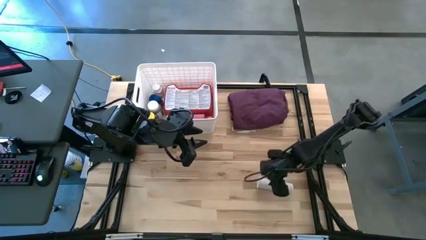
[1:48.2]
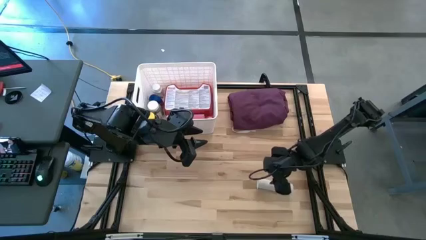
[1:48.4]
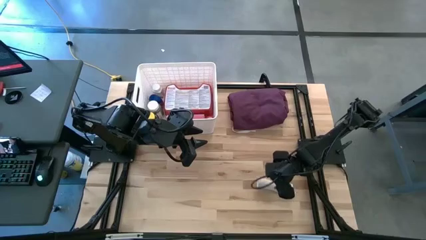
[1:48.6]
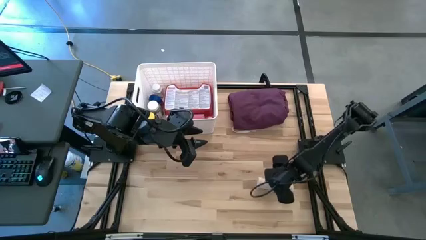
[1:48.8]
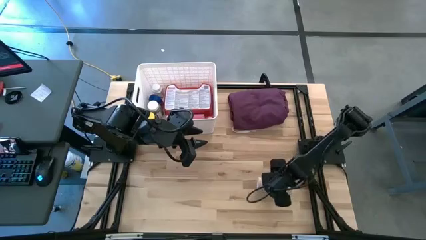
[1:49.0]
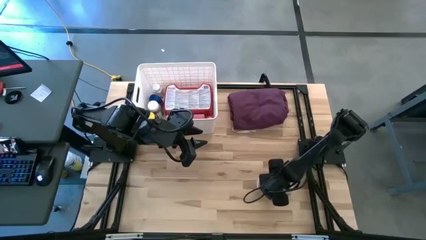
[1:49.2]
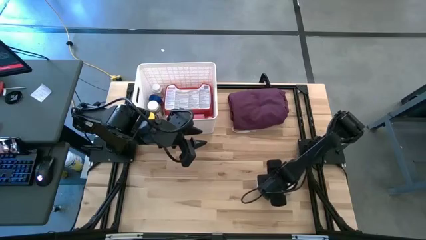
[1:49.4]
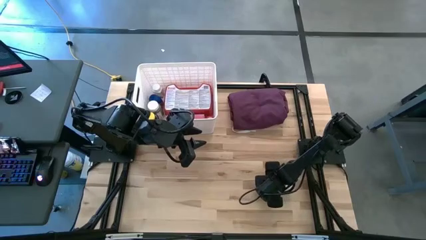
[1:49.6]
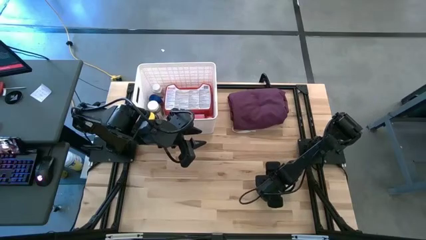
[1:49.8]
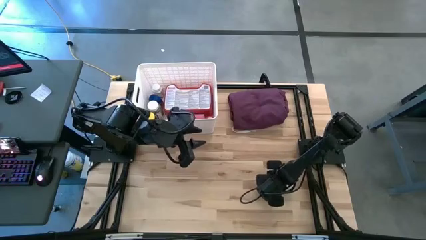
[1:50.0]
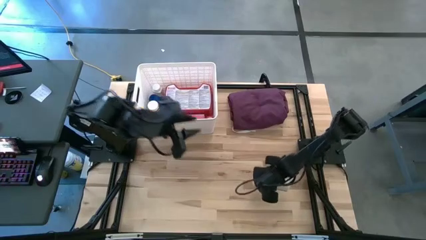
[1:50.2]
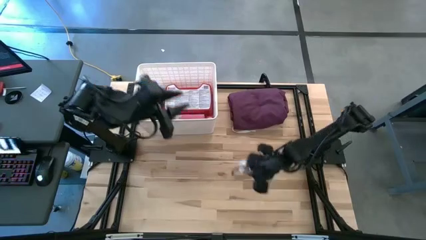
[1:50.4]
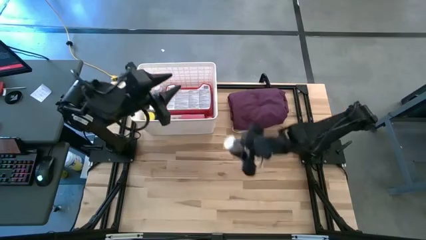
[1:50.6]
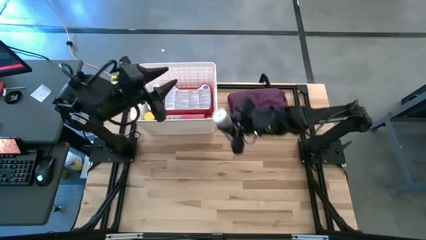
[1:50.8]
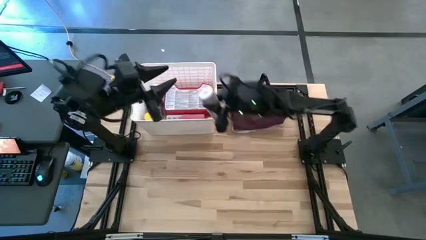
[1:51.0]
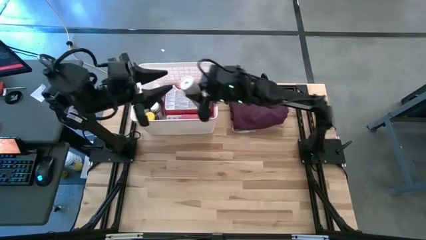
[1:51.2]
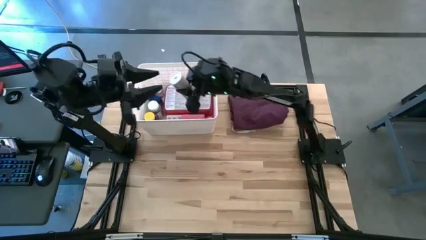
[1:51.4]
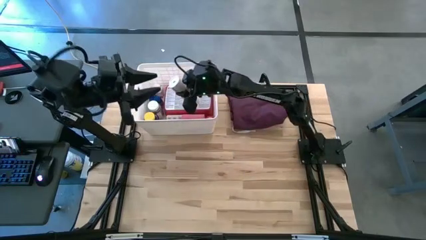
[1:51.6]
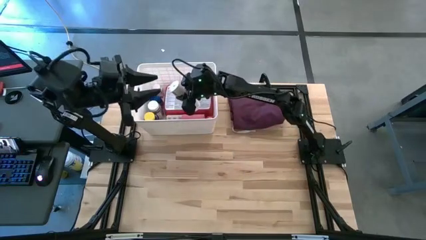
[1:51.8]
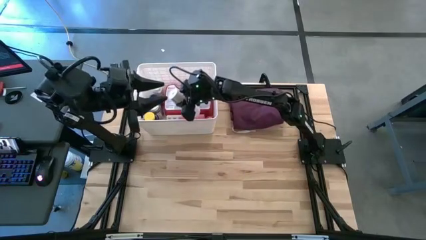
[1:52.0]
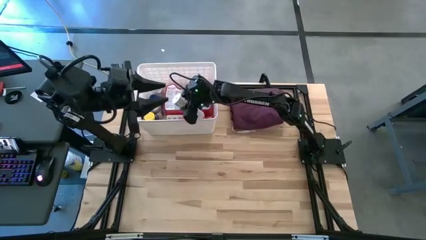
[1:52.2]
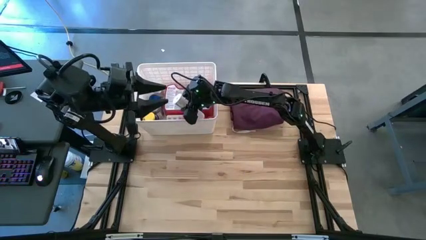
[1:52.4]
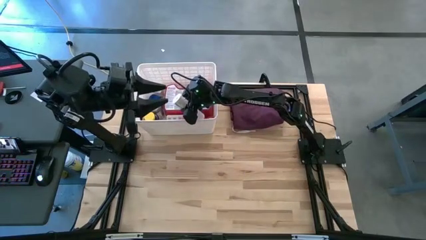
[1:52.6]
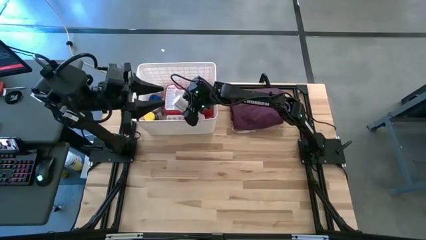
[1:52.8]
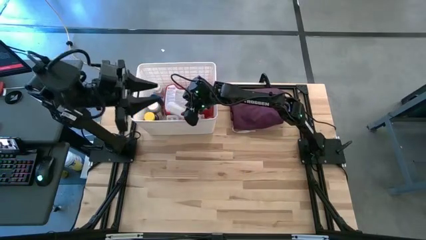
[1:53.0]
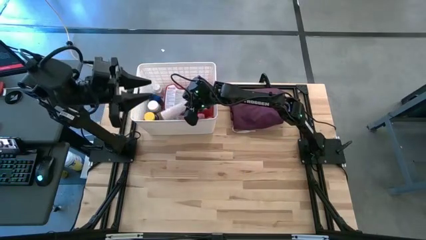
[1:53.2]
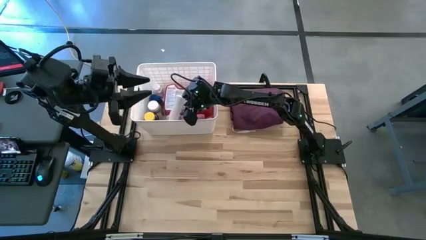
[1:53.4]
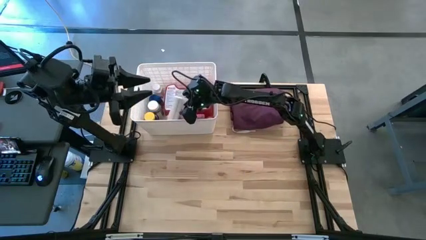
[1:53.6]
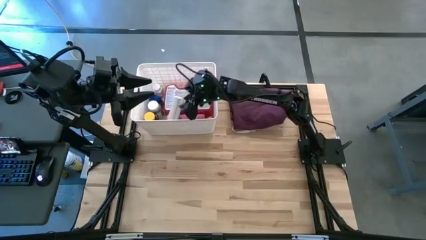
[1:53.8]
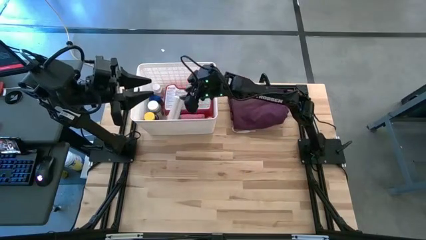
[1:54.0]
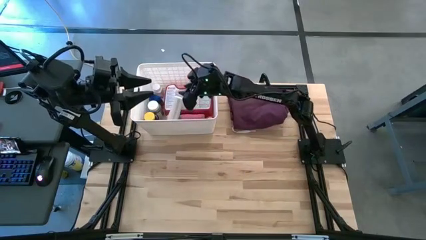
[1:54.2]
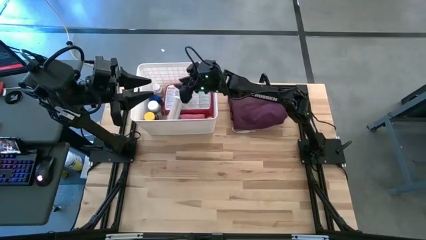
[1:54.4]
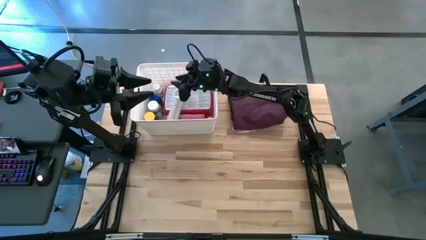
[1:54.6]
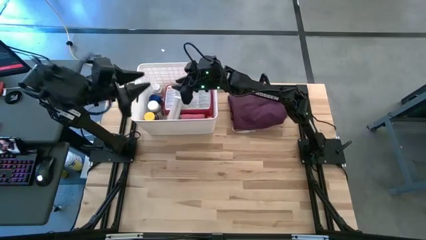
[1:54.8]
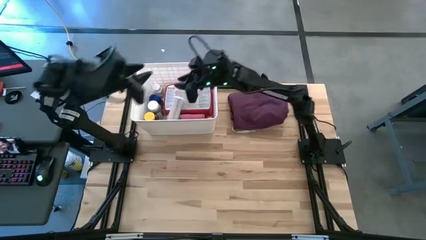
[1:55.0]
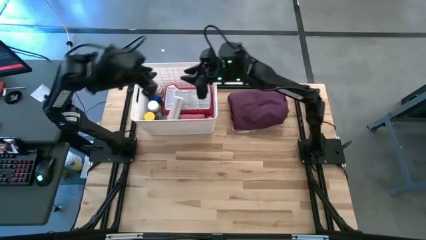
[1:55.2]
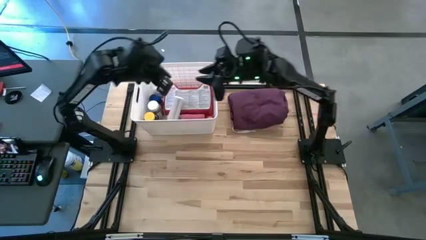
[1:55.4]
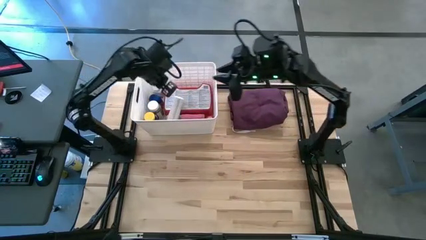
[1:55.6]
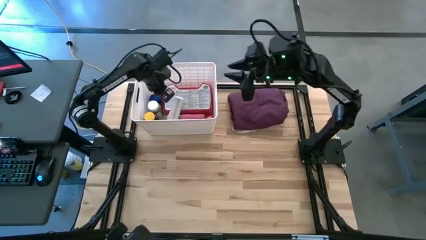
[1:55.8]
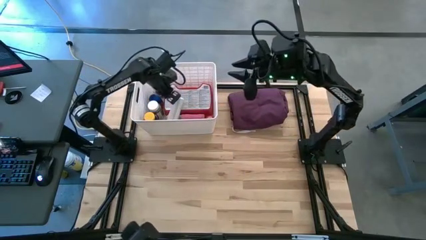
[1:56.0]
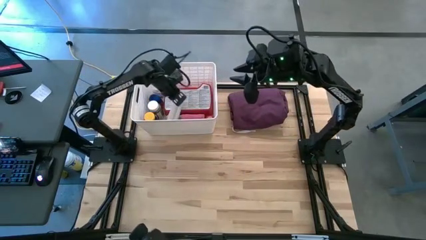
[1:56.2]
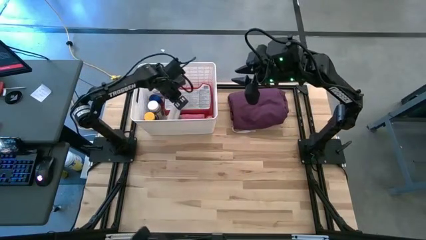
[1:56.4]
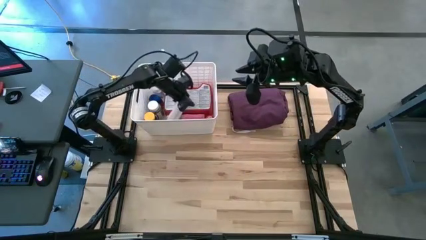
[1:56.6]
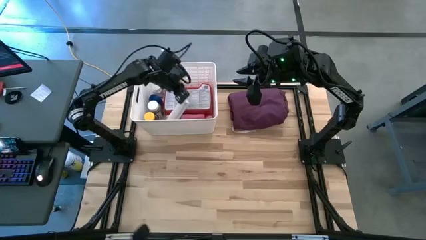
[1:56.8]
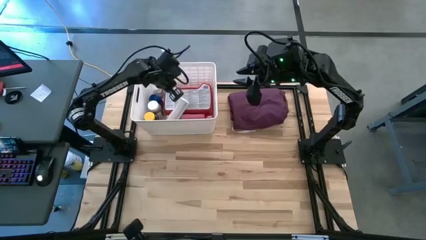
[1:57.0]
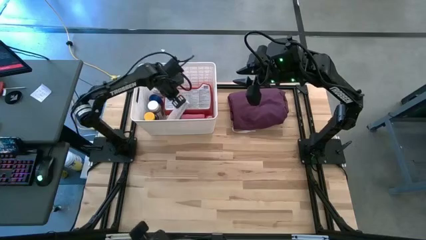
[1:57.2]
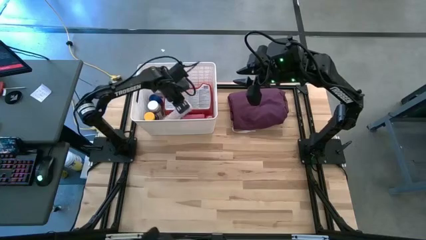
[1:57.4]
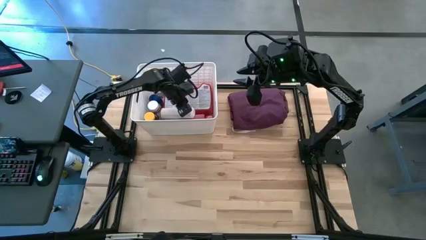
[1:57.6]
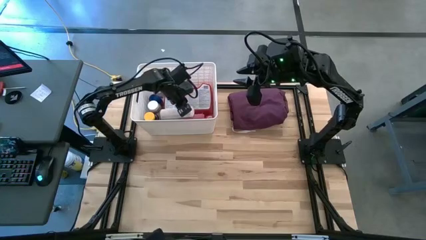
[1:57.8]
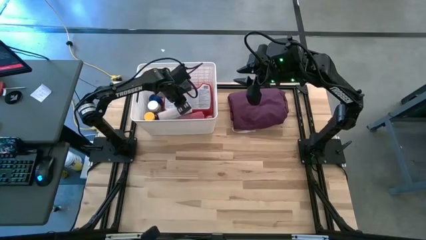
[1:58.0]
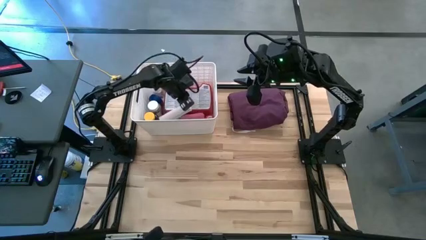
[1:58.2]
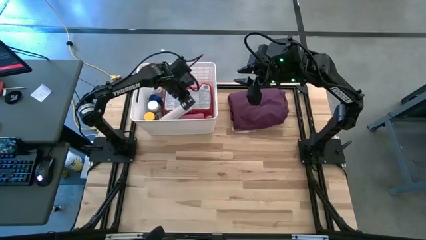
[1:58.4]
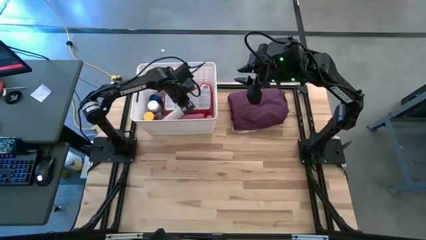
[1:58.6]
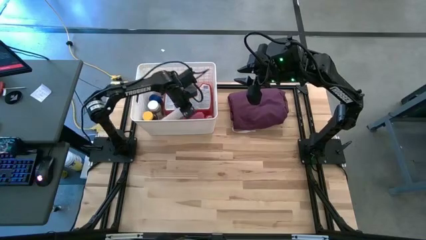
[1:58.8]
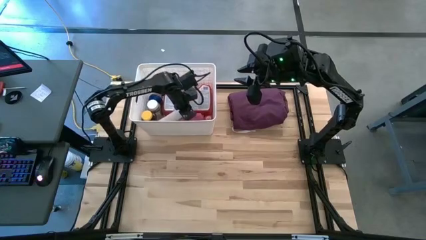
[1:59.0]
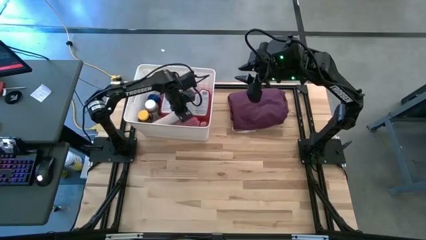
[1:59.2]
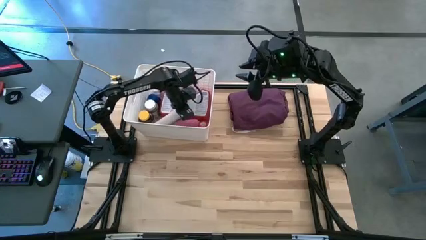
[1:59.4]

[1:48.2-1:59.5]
Task: Pick & place medical supplies in basket/bin
Put the white bandage into the white bin

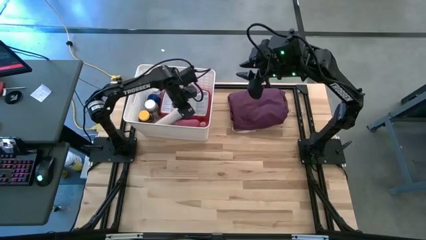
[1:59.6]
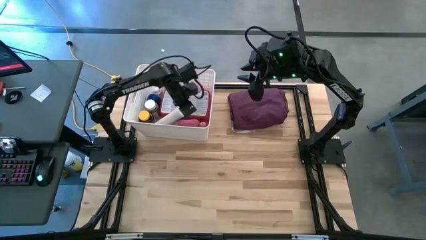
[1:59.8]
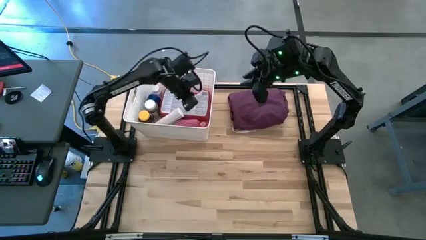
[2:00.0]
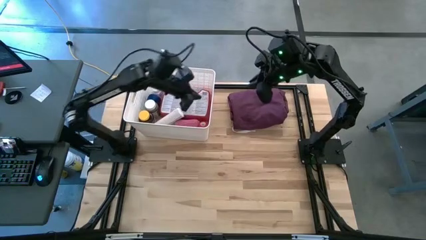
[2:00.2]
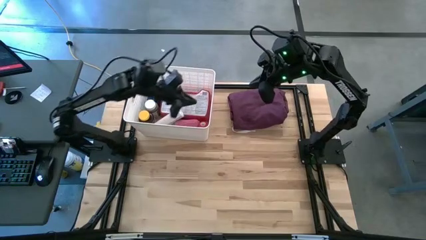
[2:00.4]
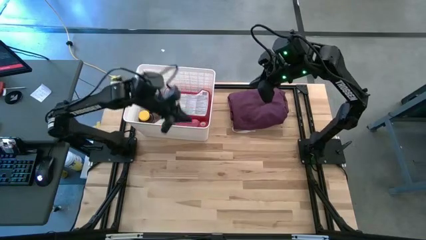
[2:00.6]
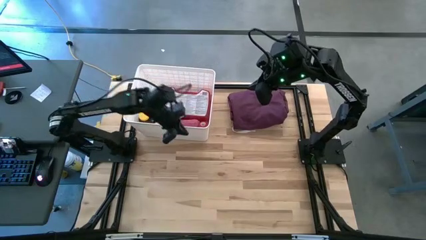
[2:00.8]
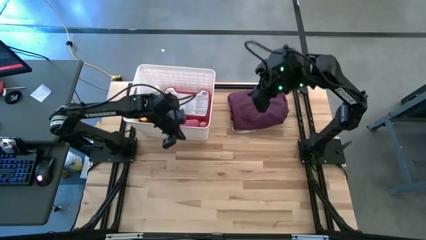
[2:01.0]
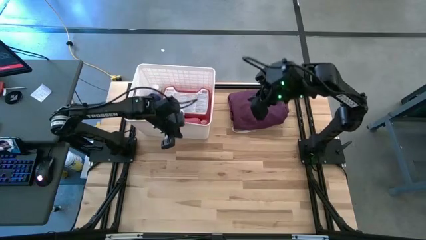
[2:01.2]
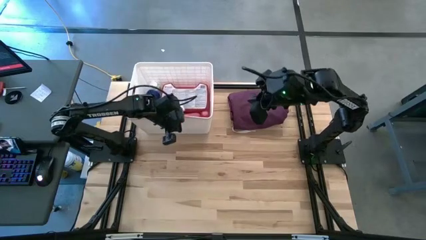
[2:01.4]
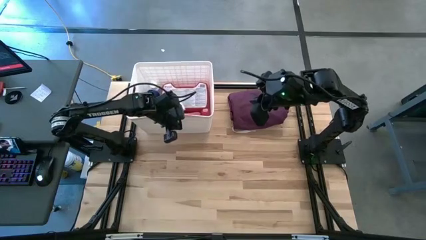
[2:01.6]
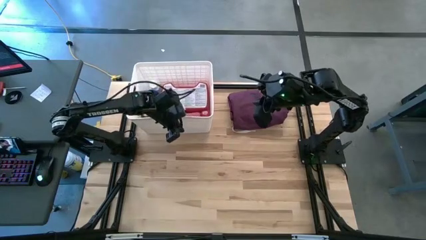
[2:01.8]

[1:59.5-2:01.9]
Adjust the white bin

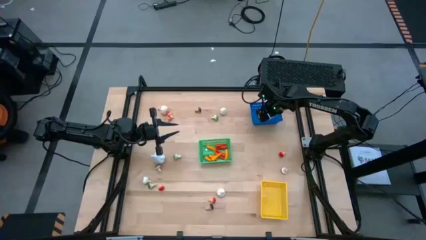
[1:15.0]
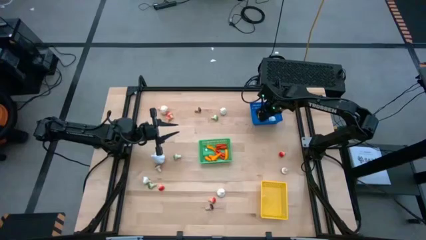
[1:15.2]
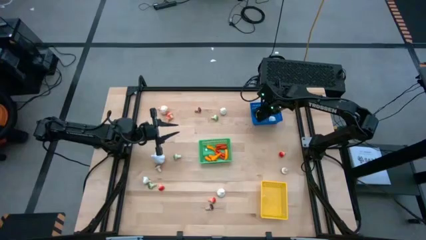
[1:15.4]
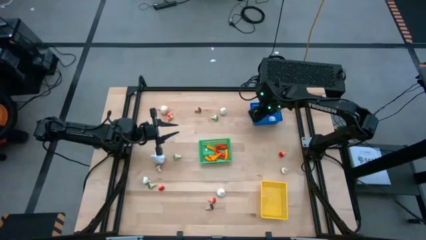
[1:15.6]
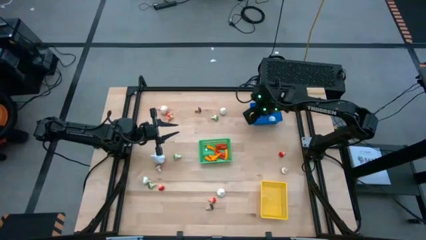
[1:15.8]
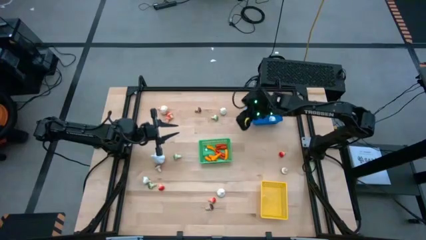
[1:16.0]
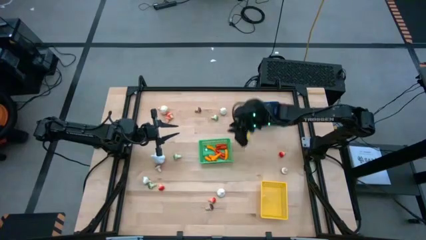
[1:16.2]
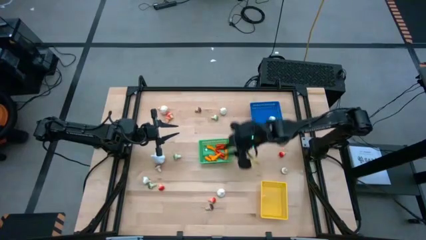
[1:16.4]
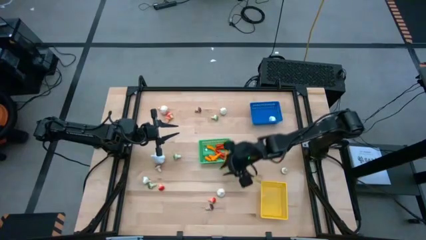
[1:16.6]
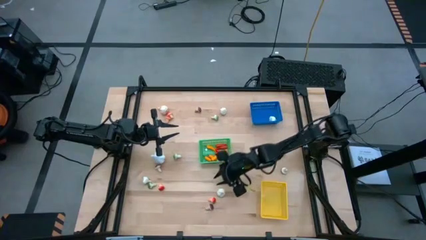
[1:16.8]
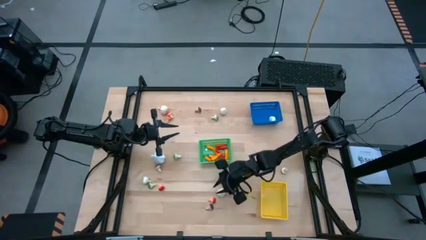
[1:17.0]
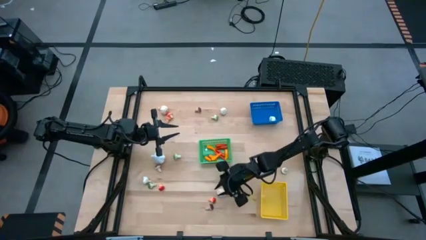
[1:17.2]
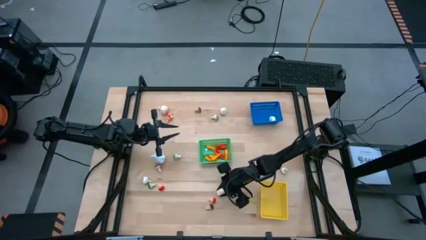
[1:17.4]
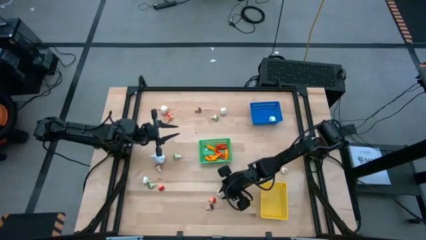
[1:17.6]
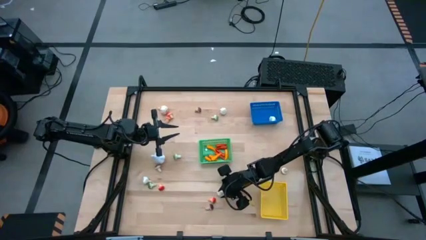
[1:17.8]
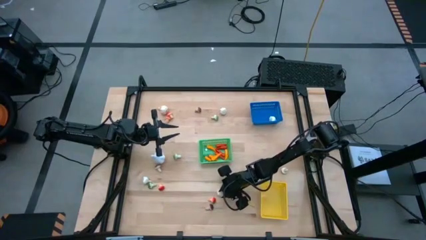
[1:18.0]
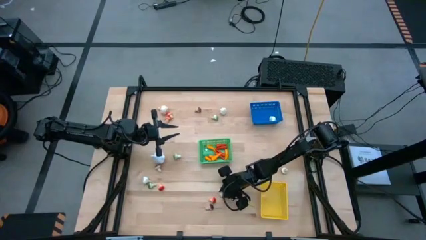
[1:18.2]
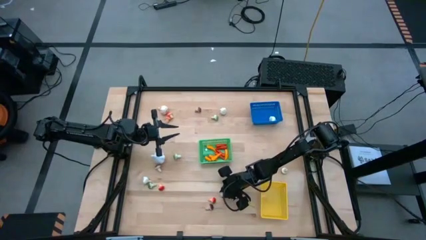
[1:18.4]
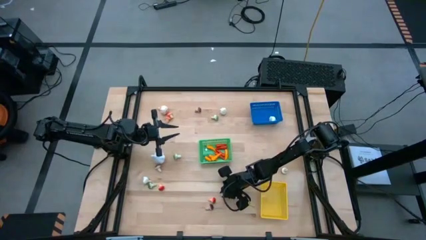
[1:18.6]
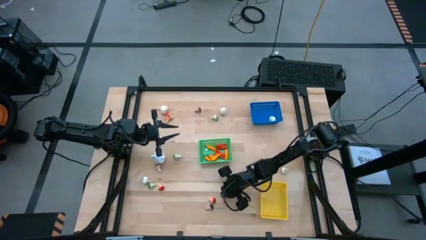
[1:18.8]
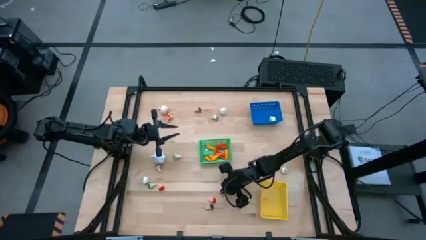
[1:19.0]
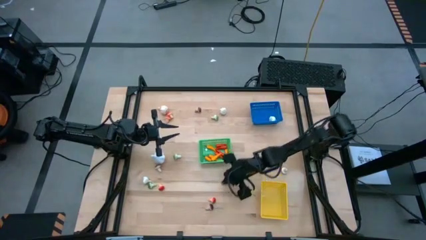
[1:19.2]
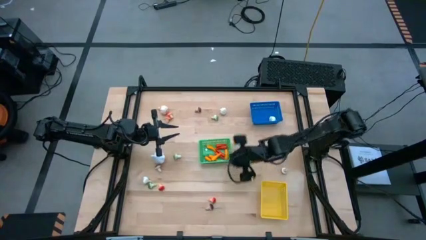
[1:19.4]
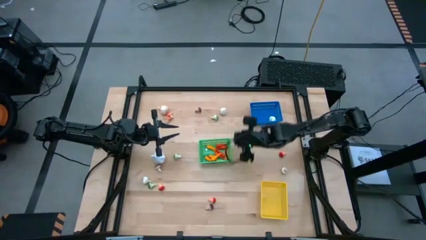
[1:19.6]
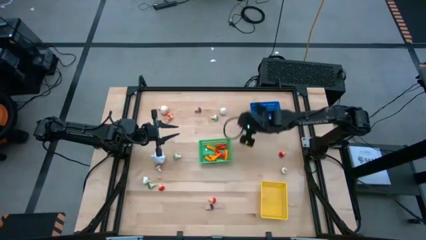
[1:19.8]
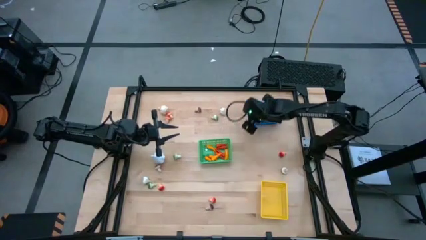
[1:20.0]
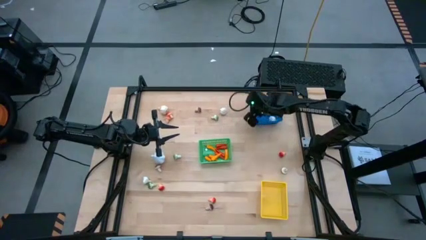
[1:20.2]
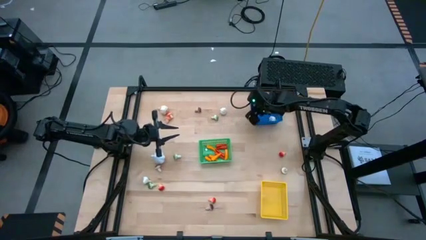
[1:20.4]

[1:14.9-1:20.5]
Task: Sort produce into baskets
Put the garlic into the blue bin
